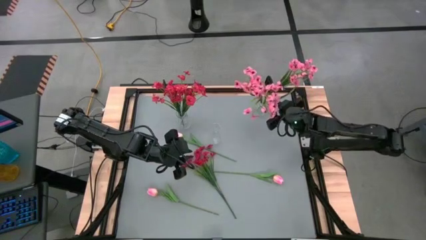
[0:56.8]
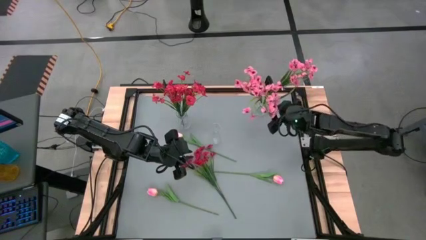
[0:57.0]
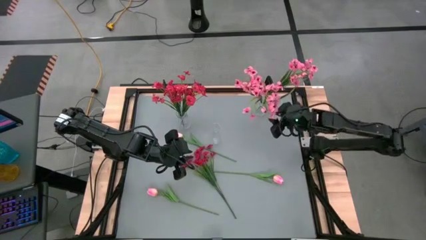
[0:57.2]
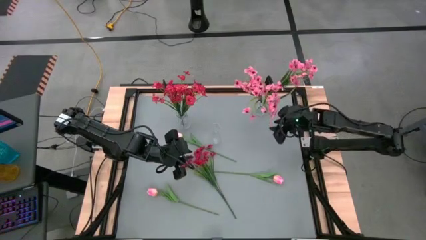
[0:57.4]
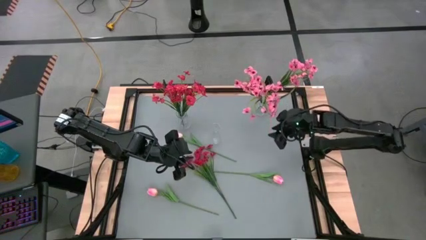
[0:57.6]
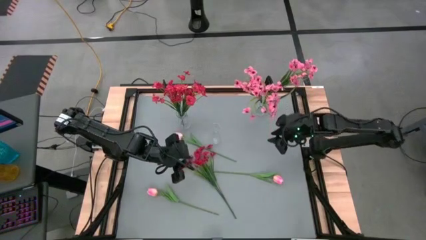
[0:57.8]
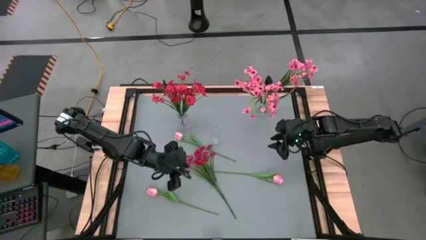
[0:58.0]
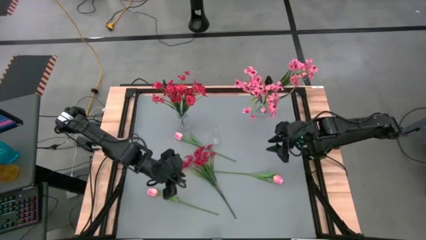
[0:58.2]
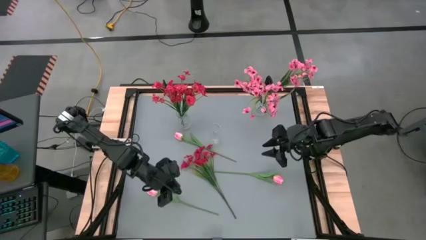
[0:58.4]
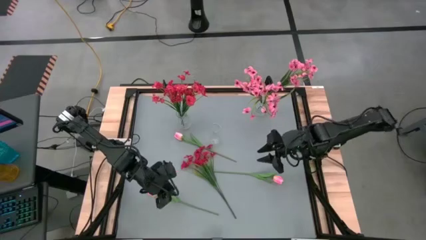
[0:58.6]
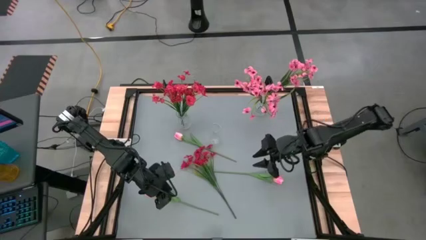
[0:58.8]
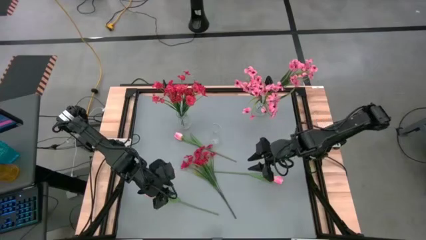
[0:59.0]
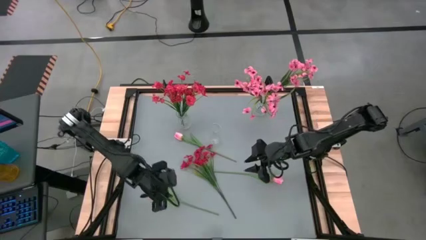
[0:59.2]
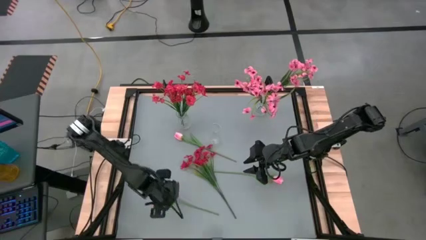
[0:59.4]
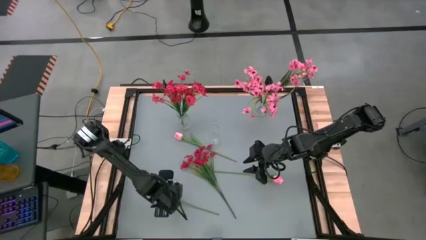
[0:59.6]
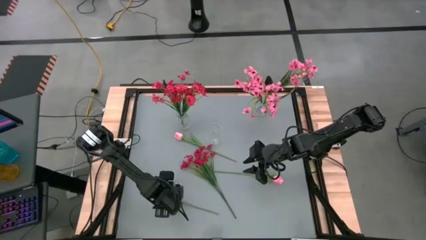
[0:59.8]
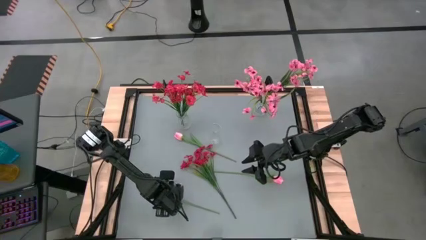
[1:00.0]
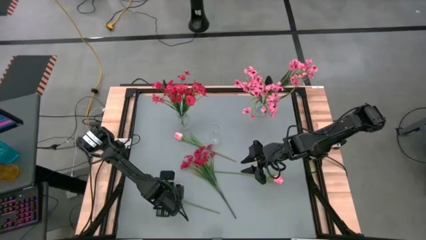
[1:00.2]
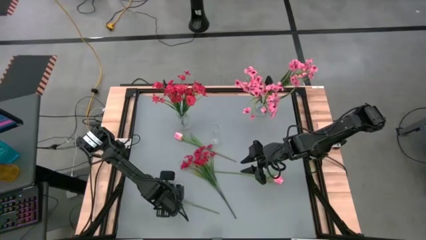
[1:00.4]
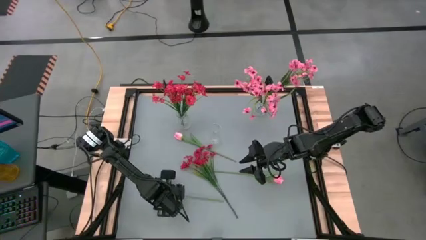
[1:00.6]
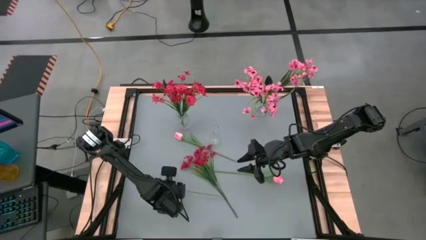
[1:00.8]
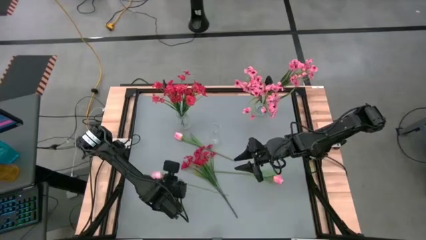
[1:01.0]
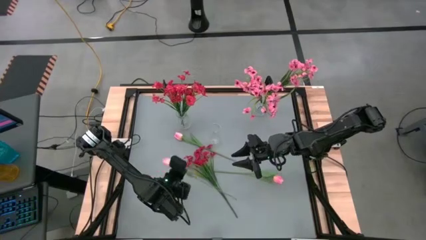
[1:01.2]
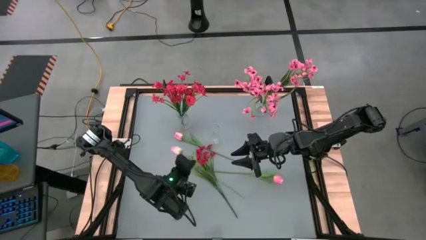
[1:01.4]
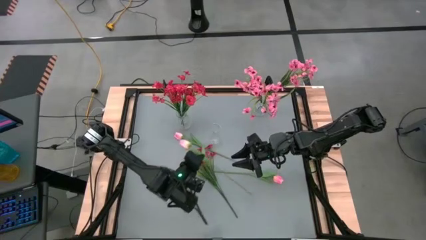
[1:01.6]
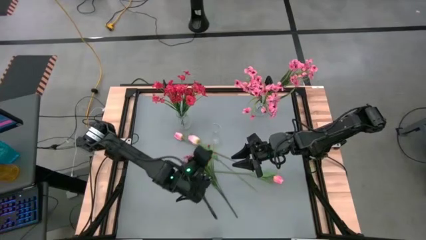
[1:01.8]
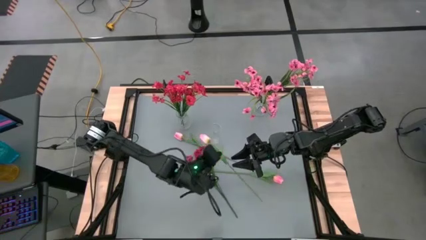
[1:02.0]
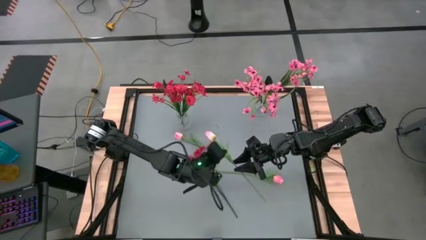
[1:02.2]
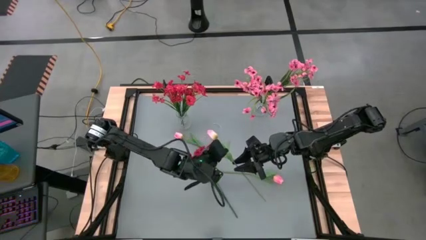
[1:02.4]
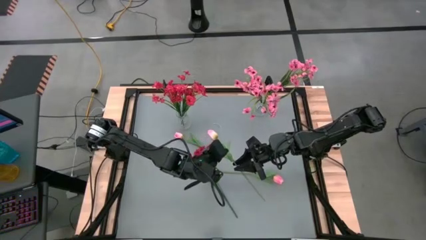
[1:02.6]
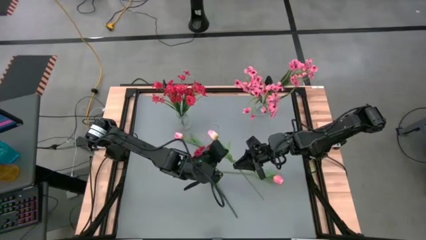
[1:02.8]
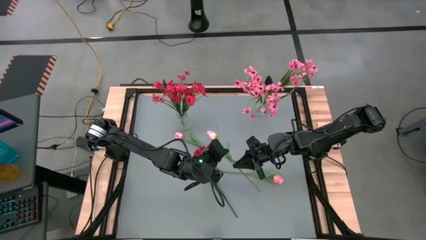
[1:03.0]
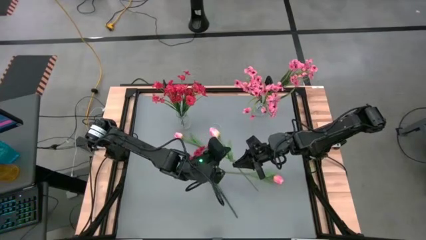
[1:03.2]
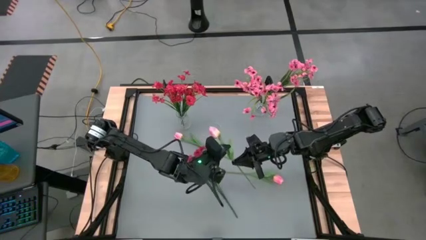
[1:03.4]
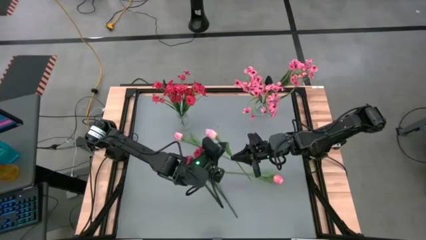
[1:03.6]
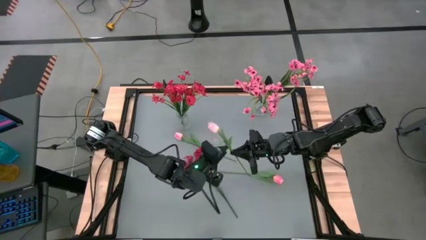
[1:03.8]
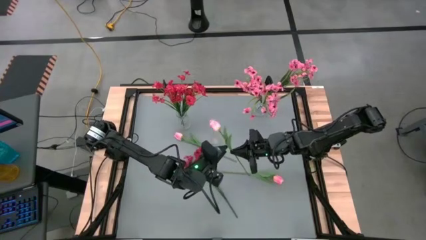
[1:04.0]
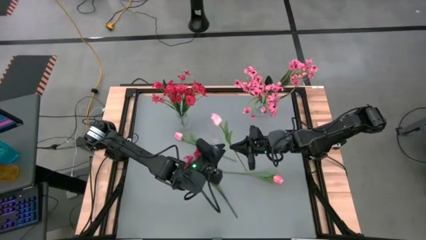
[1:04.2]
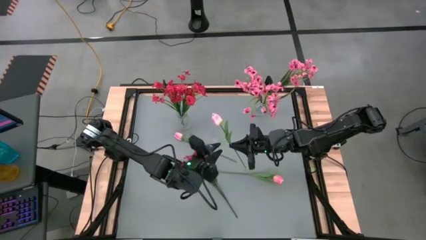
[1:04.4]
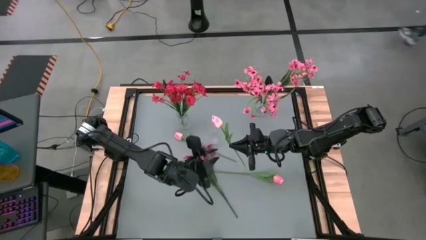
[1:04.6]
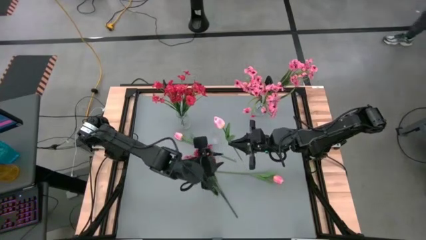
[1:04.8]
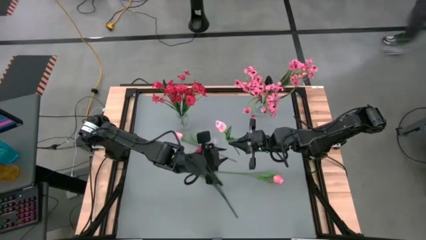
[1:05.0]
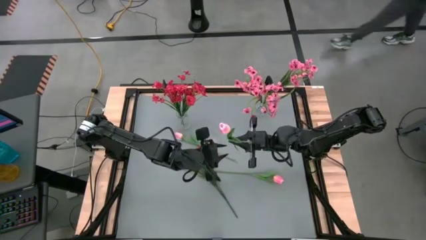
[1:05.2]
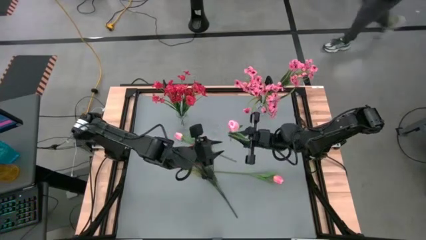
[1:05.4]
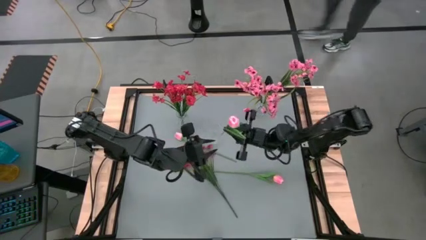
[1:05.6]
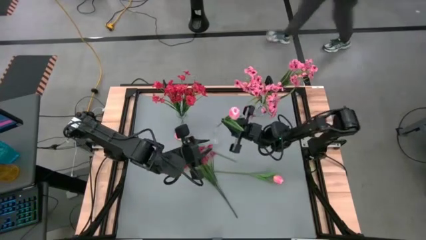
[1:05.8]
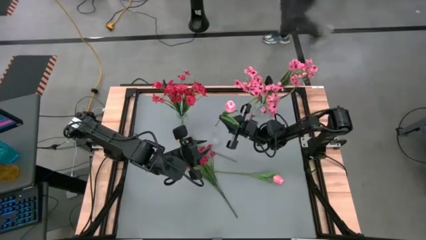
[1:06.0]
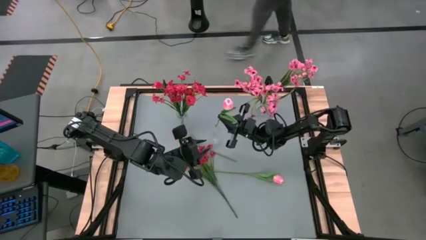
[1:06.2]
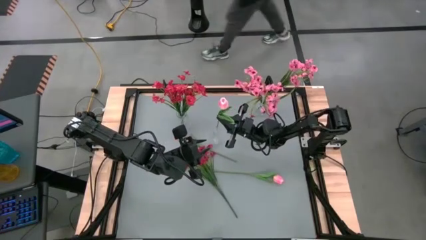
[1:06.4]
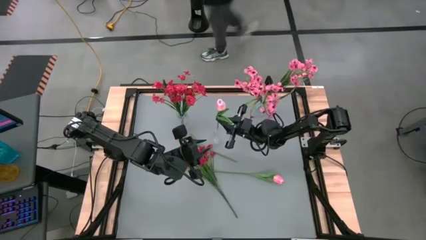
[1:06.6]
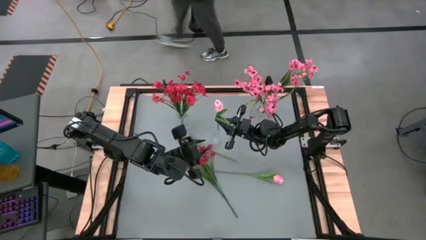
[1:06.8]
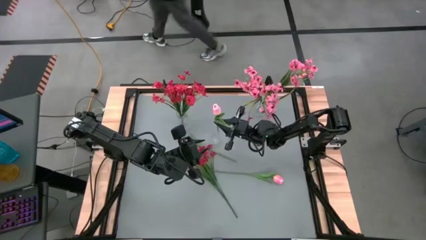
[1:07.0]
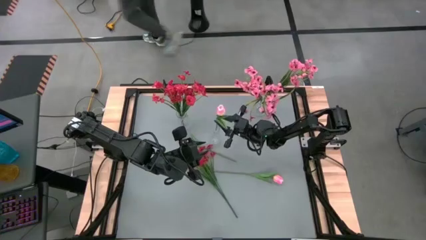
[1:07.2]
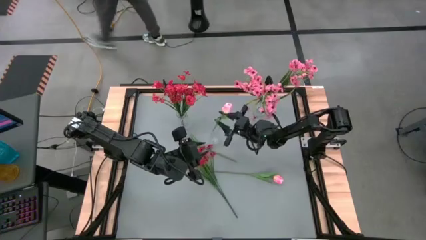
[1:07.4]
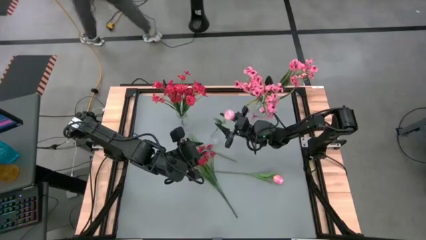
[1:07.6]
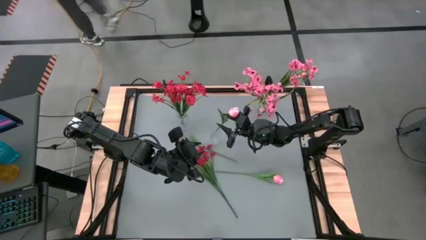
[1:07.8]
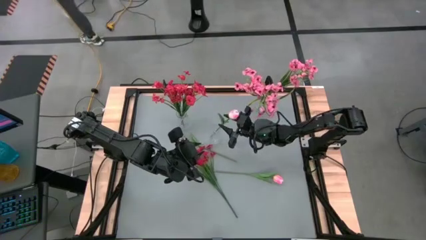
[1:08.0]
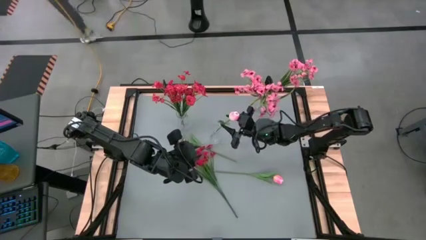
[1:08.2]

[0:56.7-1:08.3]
Task: Sort flowers into vase by color
Put the pink flower into the bottom transparent vase
